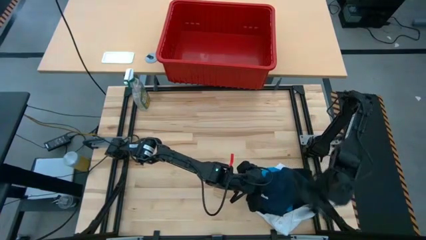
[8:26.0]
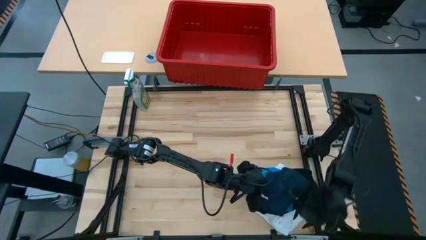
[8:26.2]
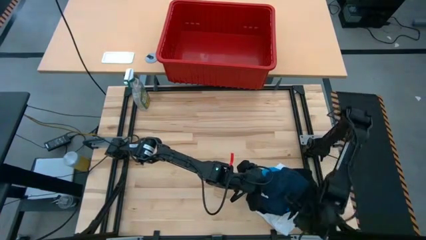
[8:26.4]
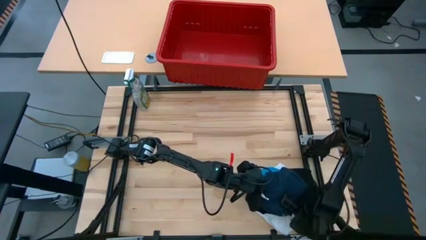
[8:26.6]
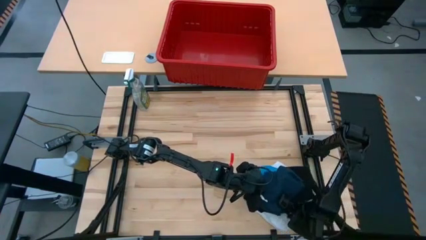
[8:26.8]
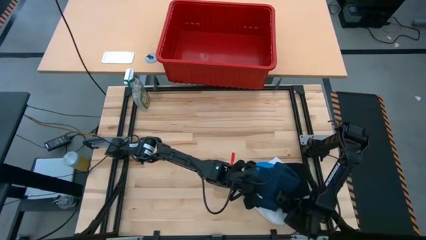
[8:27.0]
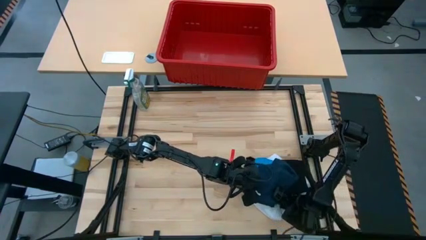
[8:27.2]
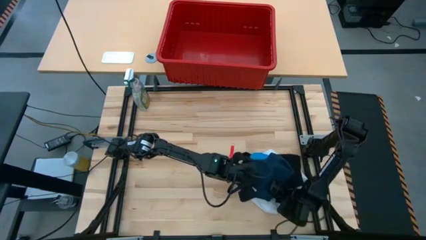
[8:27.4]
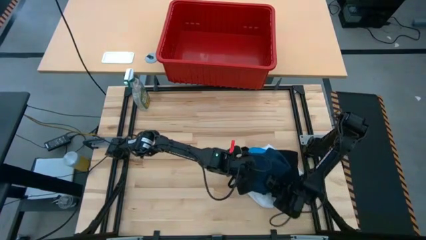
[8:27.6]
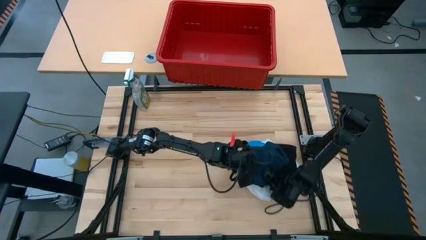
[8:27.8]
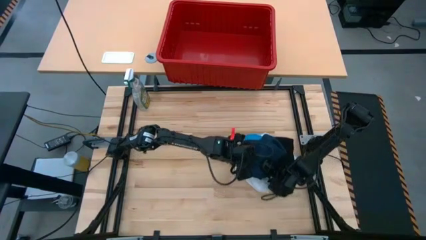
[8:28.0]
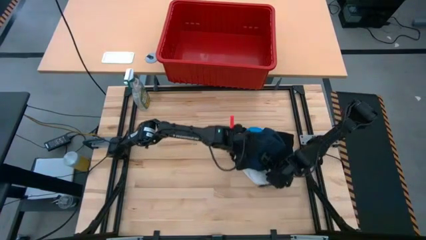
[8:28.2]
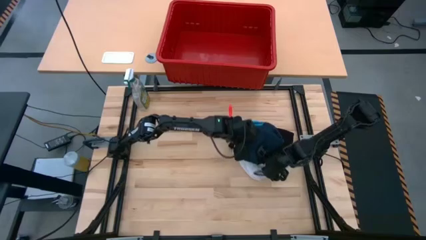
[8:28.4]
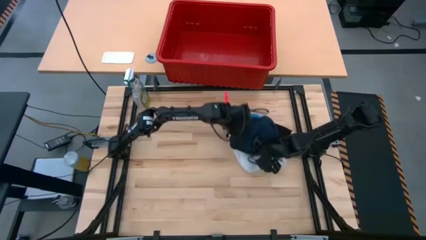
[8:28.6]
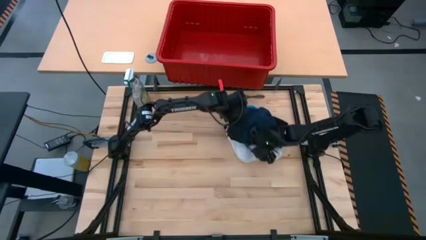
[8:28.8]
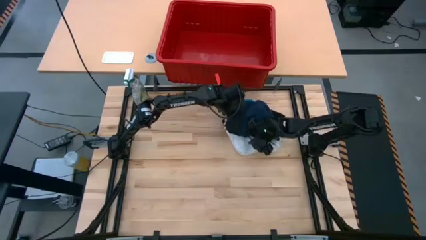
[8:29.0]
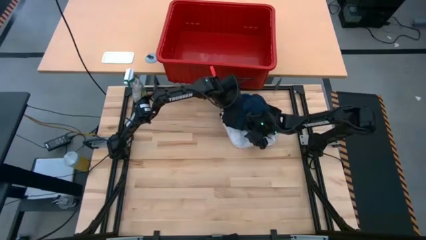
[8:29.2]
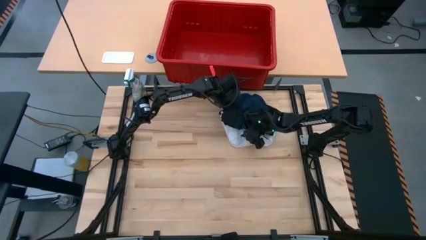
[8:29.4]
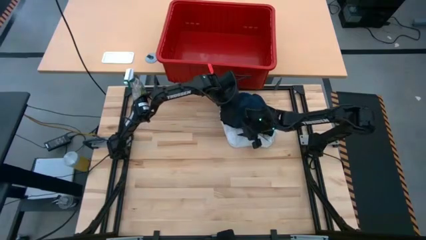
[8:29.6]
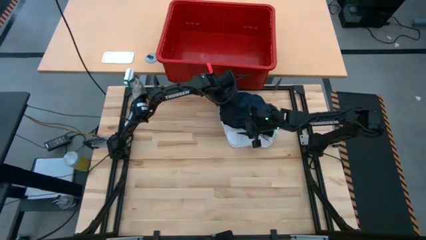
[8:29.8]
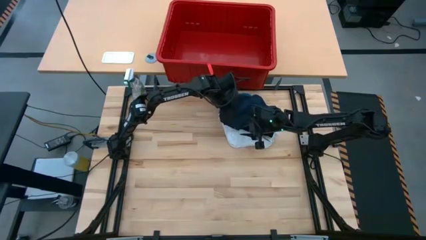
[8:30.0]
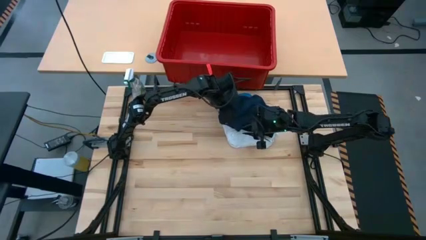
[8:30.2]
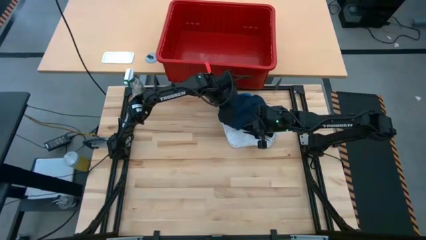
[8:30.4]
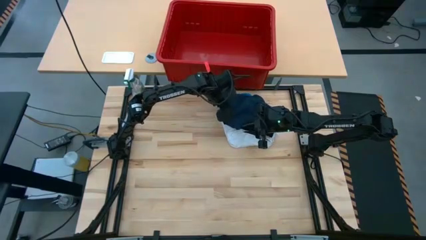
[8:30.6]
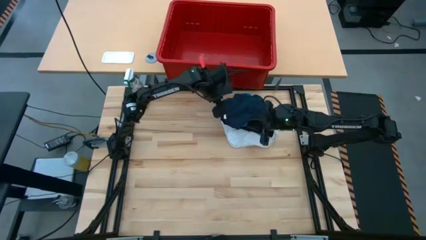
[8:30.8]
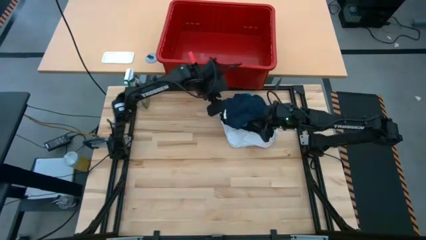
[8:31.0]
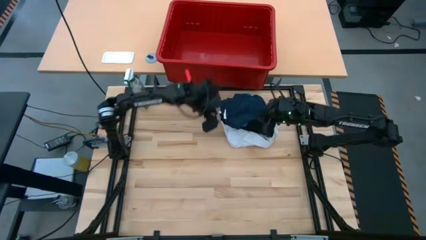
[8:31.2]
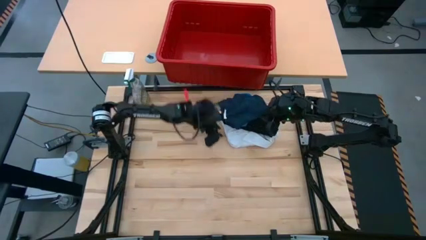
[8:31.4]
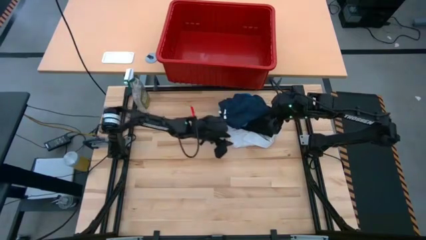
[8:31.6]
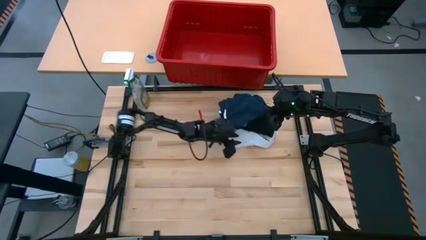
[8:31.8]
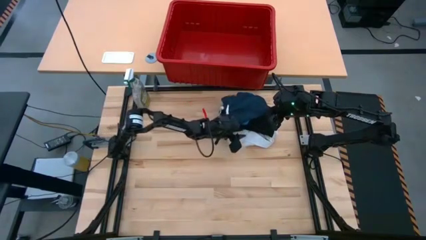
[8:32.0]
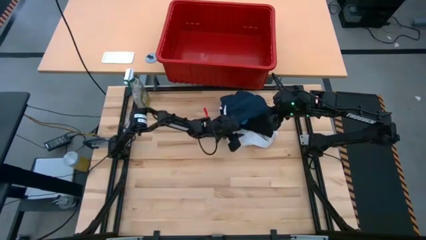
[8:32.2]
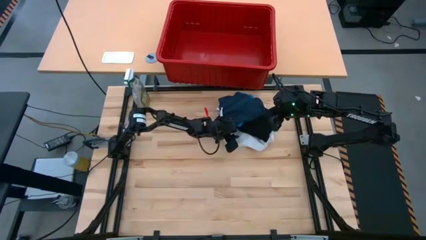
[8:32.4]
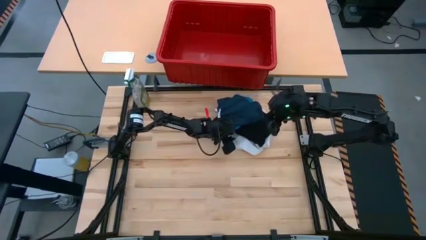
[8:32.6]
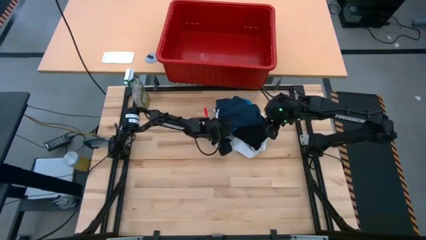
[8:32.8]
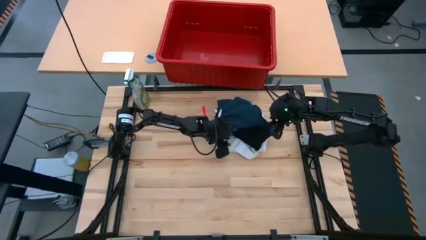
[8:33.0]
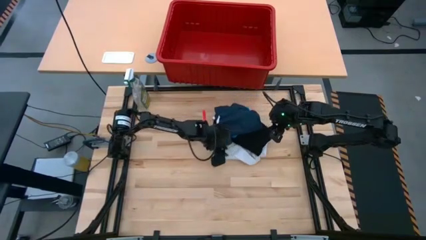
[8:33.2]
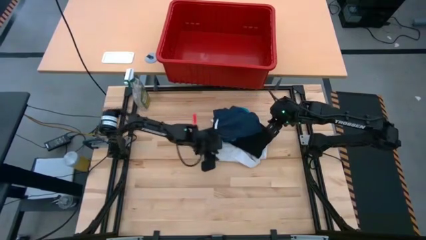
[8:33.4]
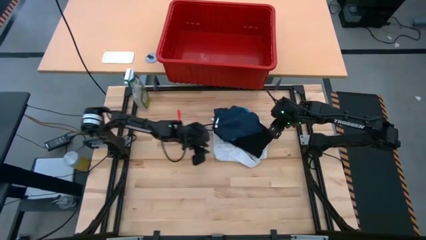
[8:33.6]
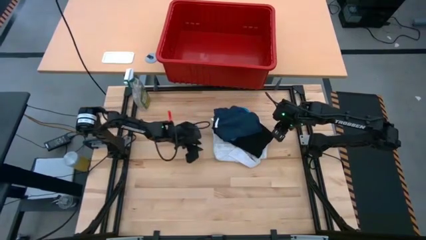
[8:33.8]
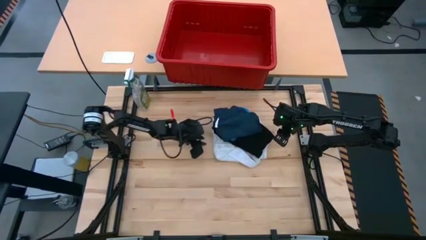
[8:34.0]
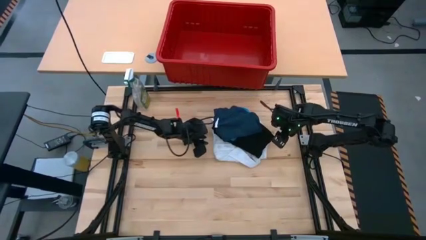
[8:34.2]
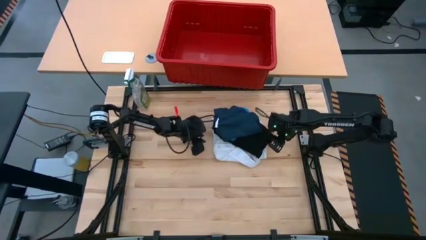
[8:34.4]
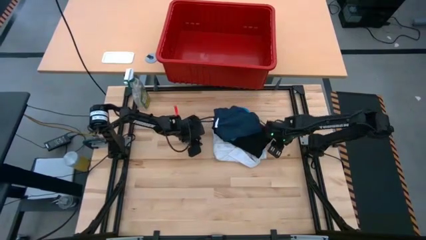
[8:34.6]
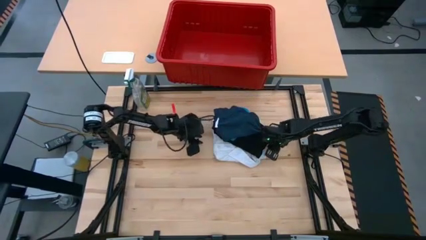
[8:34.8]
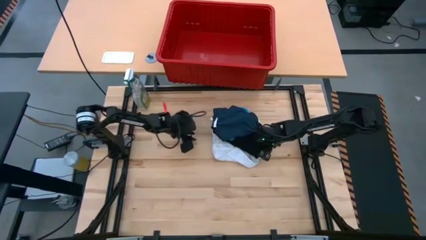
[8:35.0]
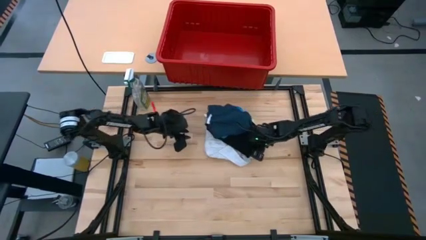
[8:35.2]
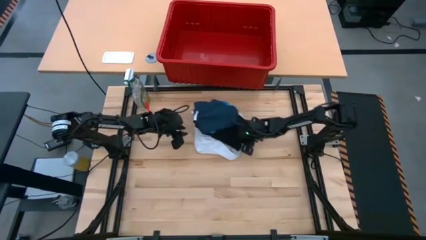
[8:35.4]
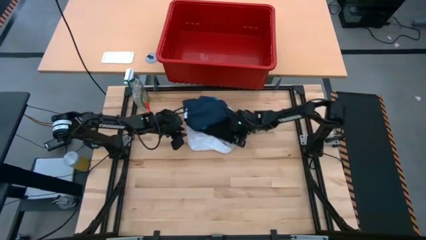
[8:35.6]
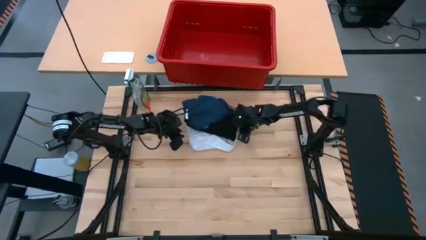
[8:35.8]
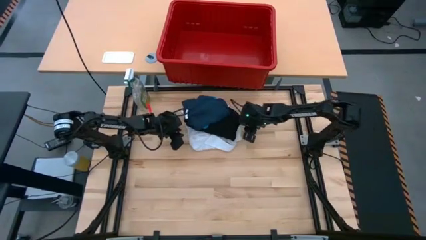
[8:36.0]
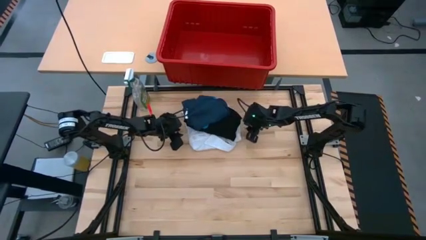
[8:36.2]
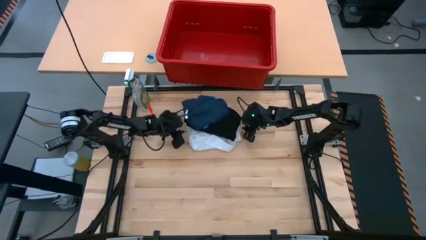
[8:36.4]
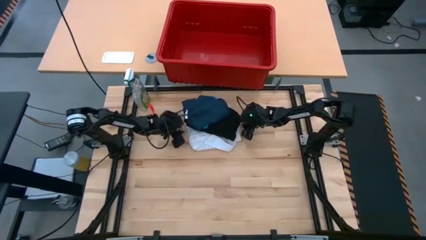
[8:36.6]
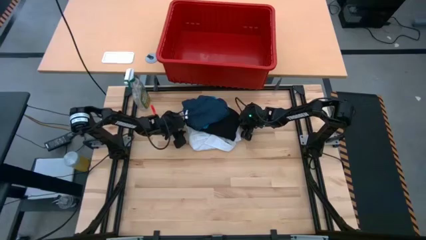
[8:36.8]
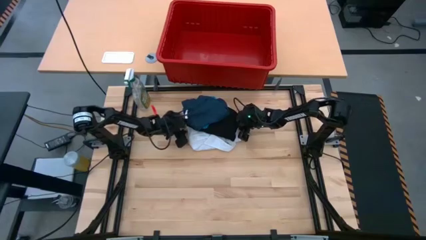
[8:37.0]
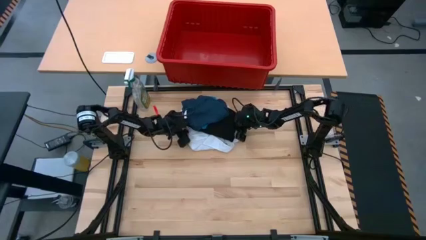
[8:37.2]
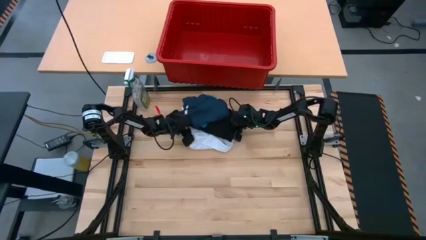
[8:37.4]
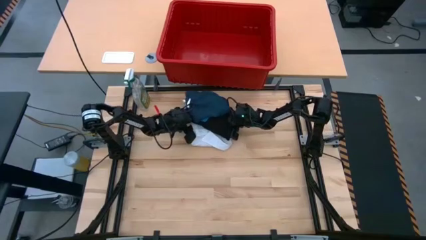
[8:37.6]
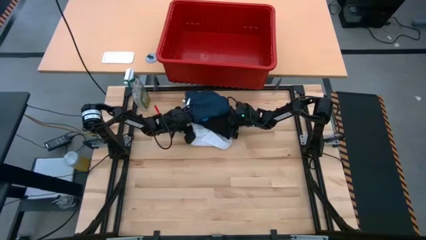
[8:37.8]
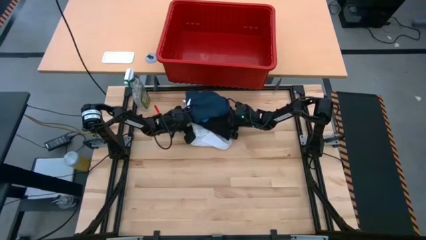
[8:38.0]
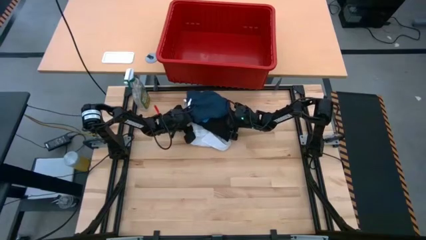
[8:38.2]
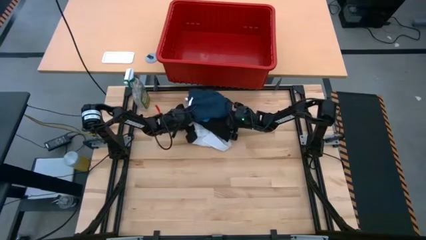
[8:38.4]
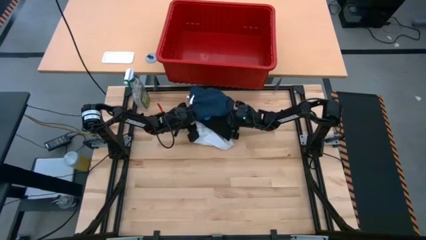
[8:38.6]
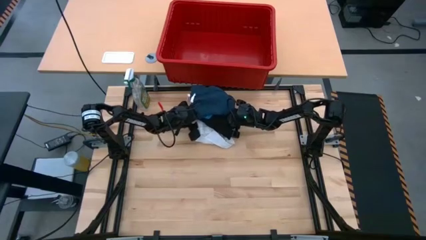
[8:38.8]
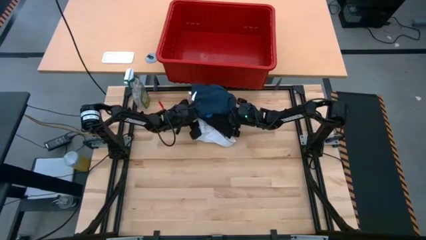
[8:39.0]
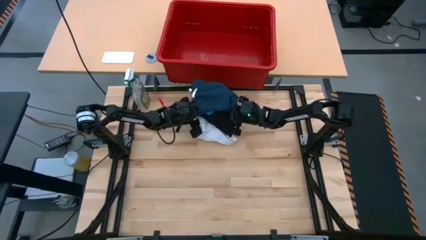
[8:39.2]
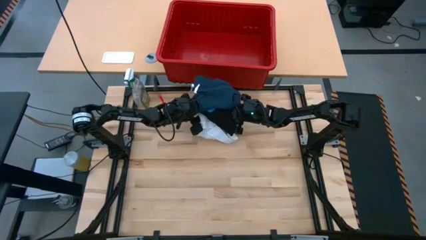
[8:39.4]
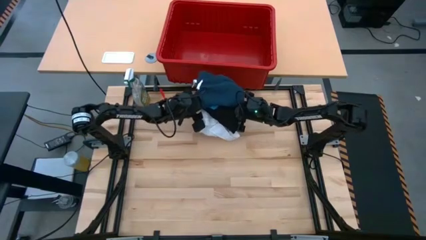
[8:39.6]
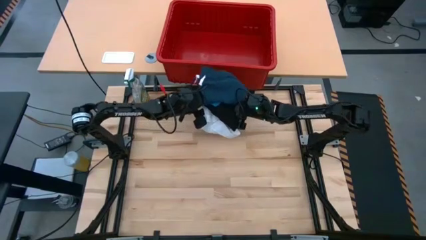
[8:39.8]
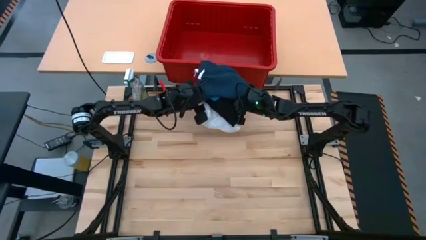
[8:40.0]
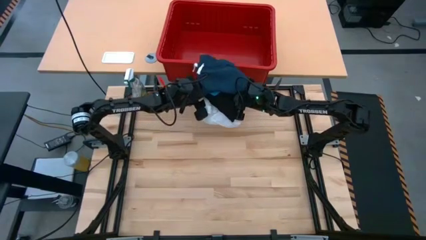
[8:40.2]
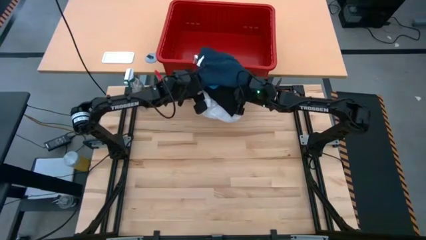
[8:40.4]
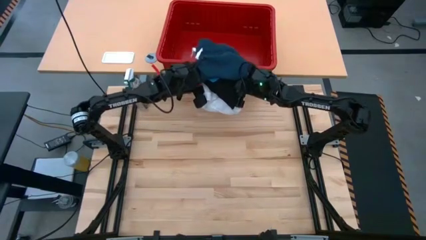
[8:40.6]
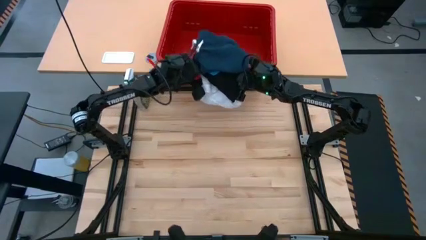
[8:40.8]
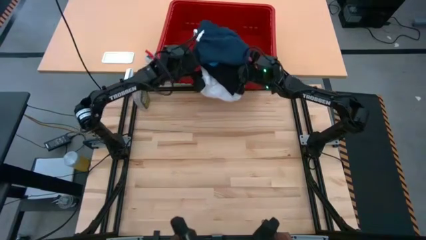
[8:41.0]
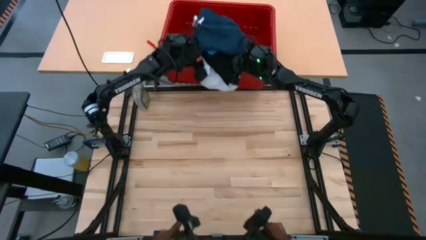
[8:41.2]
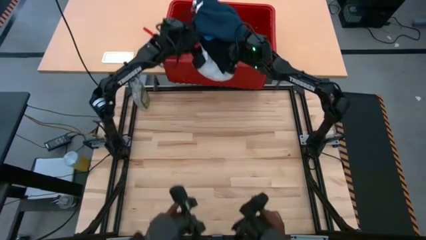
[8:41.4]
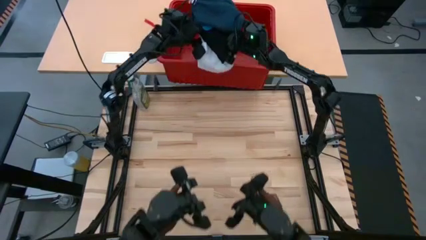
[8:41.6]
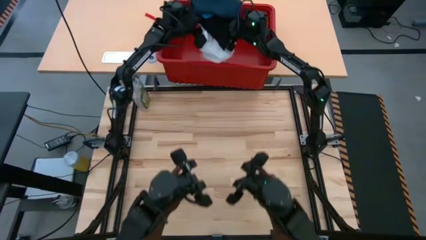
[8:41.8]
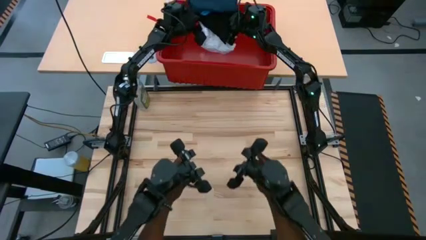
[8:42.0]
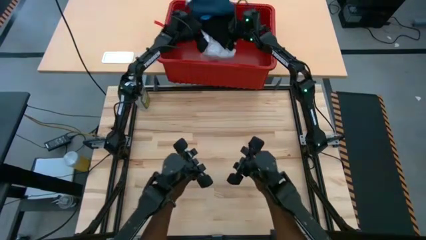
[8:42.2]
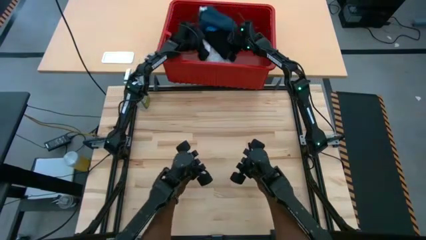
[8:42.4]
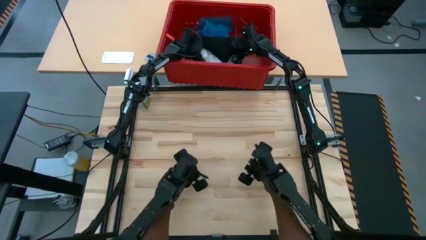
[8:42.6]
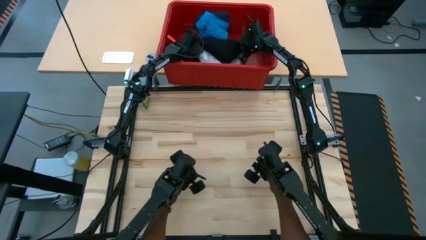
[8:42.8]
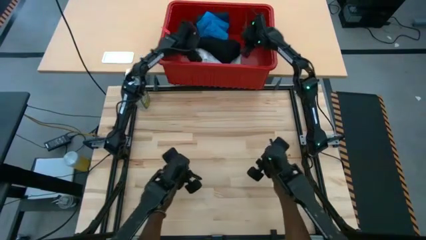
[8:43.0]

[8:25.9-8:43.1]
Task: Fold laundry
Put the stacked clothes into the red bin
